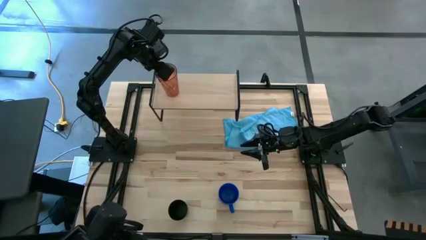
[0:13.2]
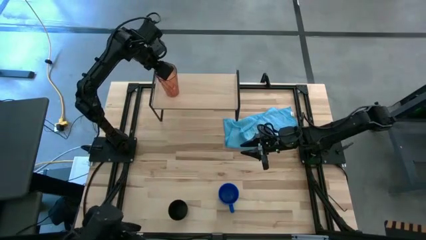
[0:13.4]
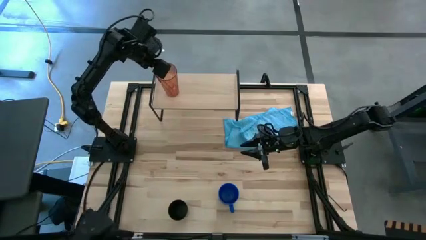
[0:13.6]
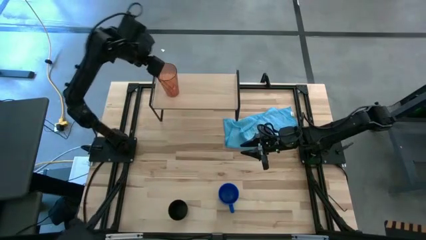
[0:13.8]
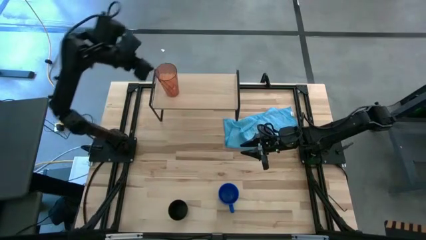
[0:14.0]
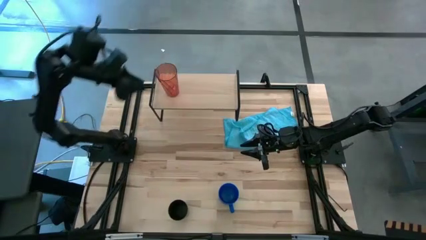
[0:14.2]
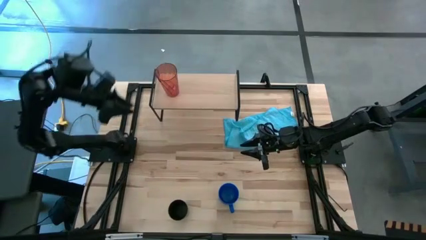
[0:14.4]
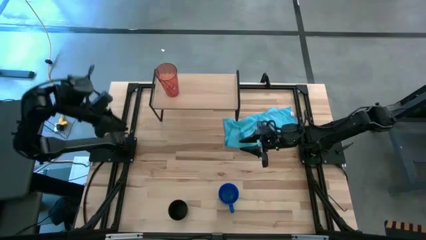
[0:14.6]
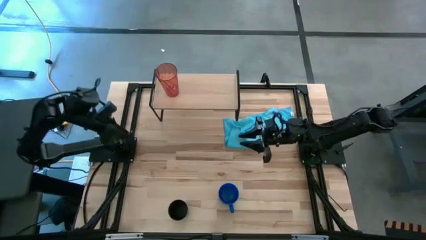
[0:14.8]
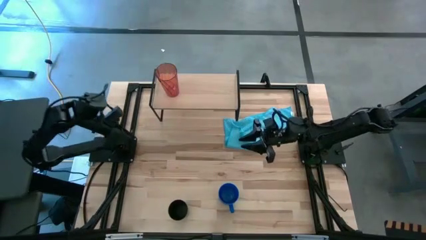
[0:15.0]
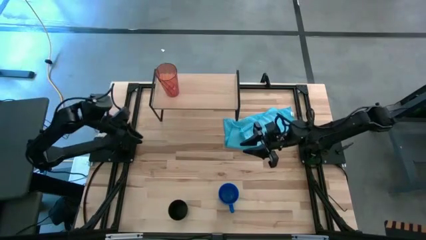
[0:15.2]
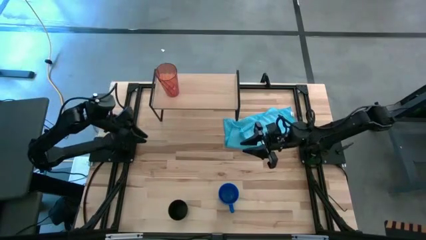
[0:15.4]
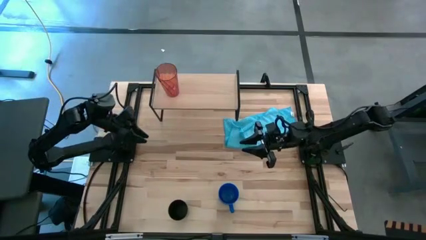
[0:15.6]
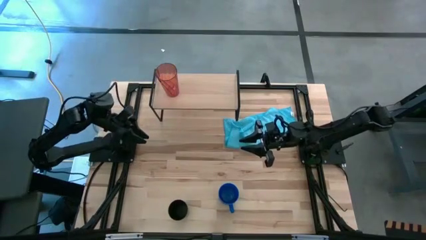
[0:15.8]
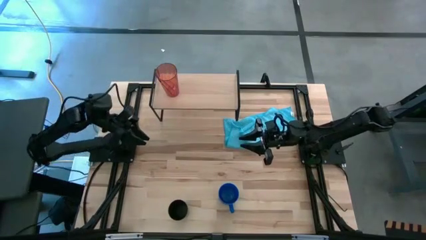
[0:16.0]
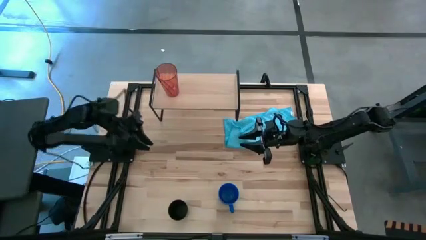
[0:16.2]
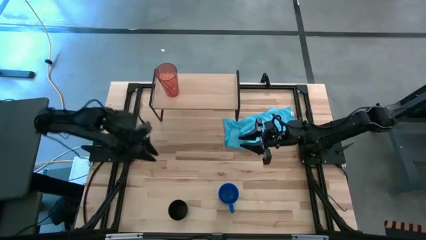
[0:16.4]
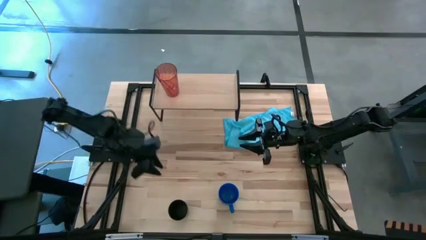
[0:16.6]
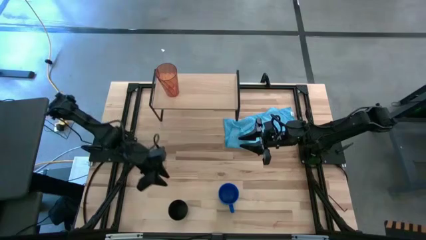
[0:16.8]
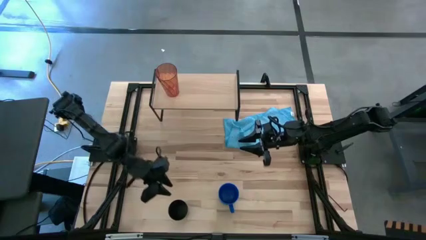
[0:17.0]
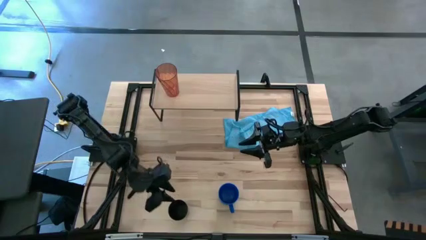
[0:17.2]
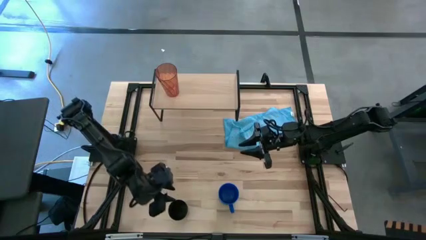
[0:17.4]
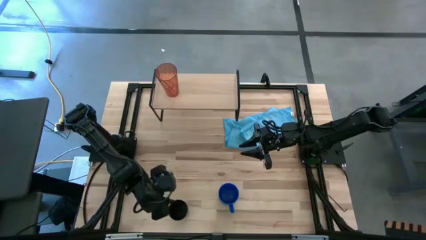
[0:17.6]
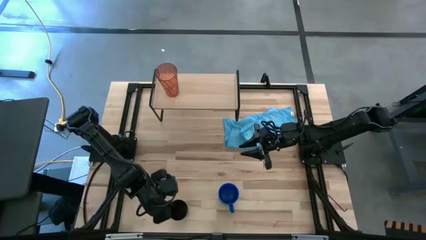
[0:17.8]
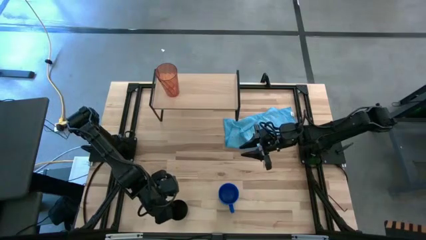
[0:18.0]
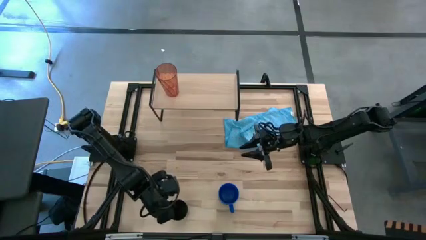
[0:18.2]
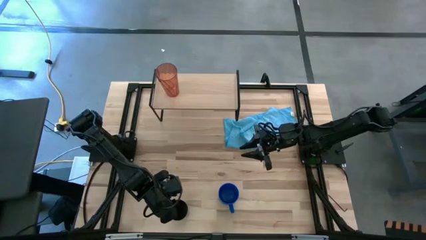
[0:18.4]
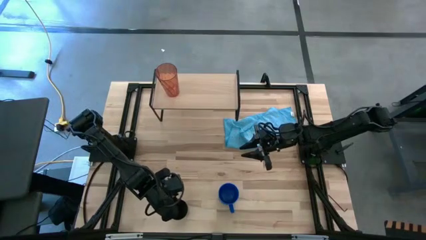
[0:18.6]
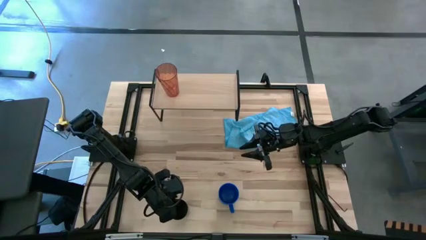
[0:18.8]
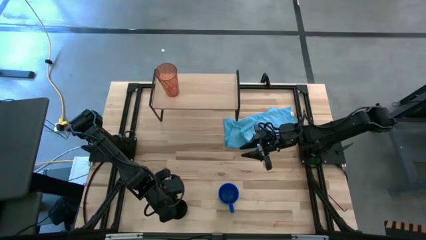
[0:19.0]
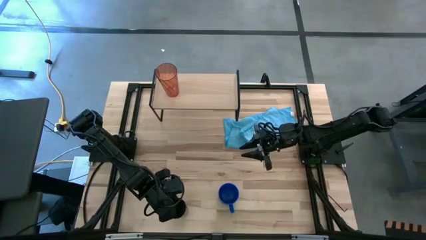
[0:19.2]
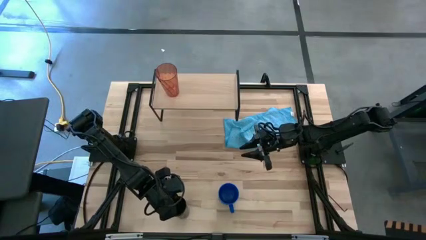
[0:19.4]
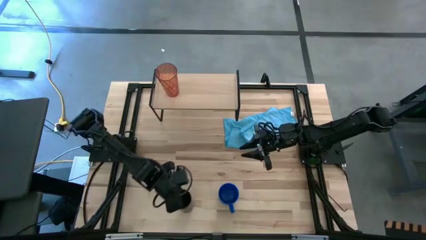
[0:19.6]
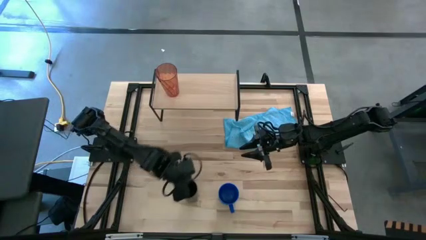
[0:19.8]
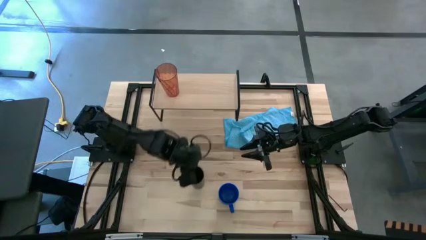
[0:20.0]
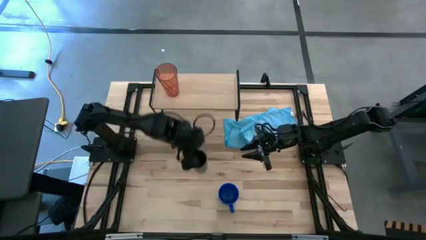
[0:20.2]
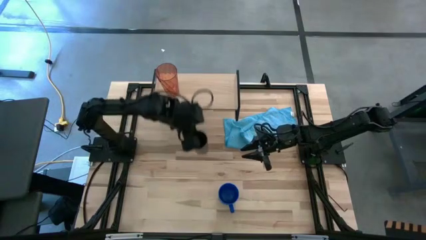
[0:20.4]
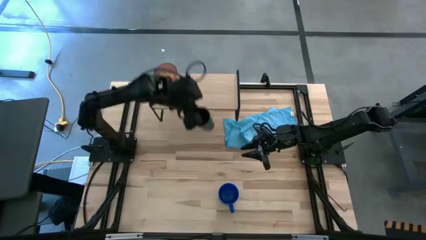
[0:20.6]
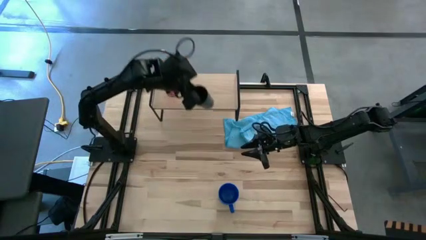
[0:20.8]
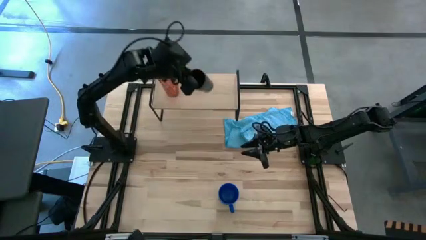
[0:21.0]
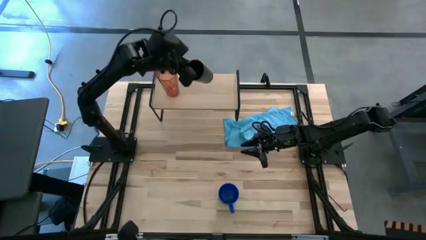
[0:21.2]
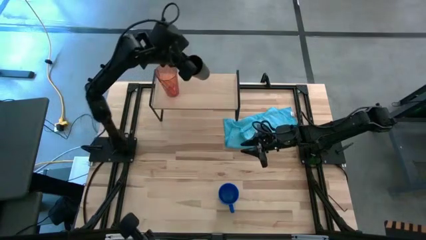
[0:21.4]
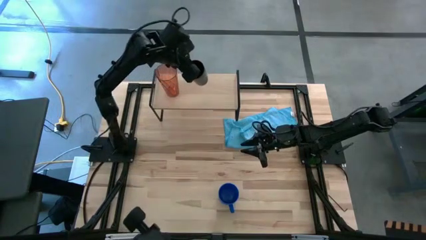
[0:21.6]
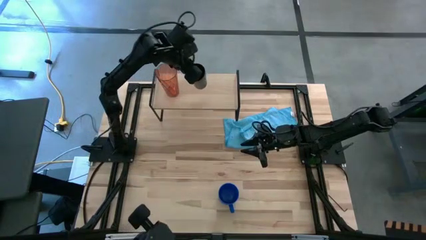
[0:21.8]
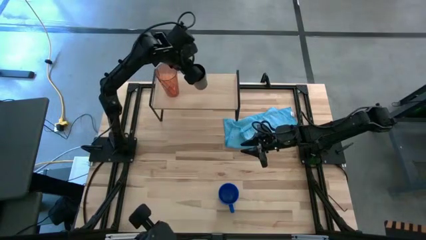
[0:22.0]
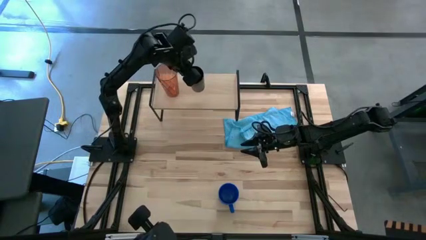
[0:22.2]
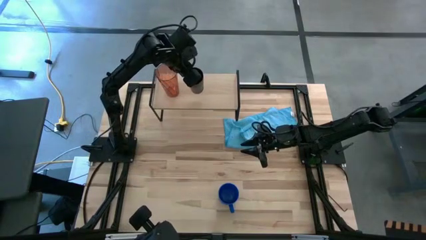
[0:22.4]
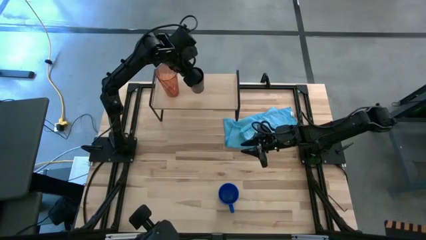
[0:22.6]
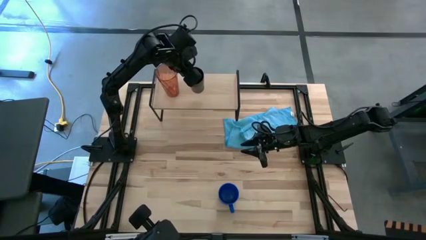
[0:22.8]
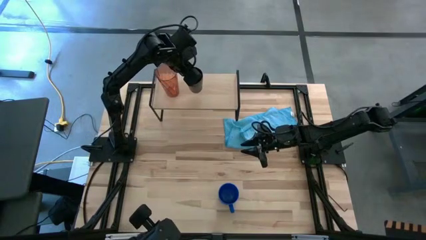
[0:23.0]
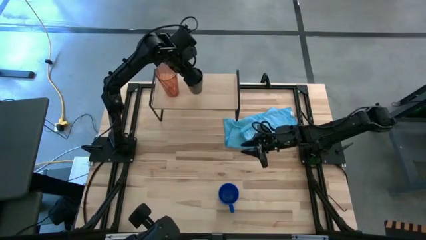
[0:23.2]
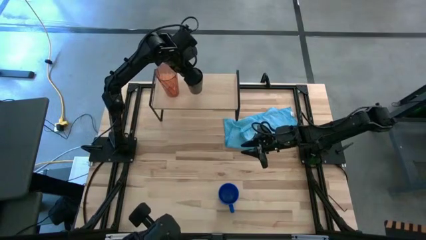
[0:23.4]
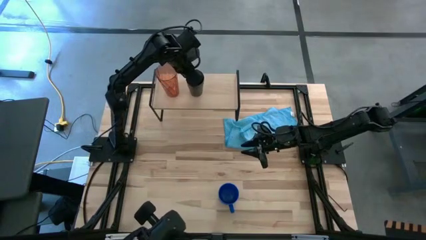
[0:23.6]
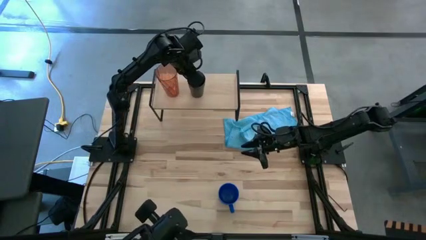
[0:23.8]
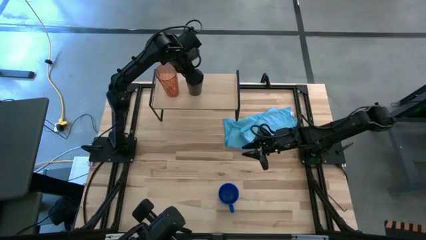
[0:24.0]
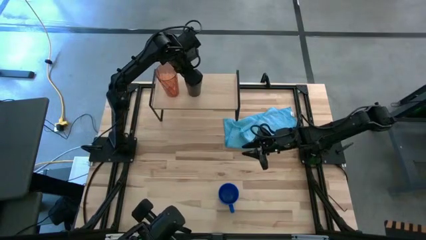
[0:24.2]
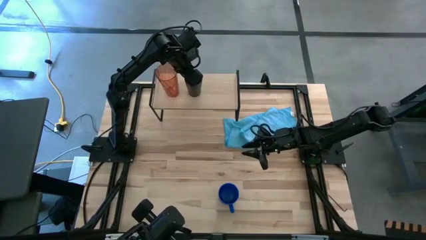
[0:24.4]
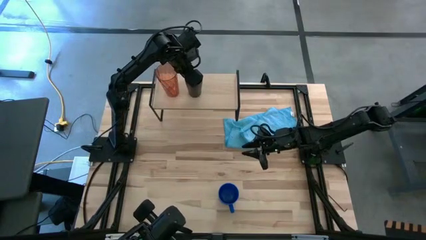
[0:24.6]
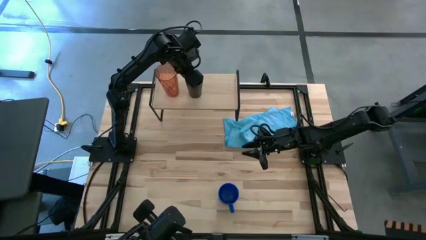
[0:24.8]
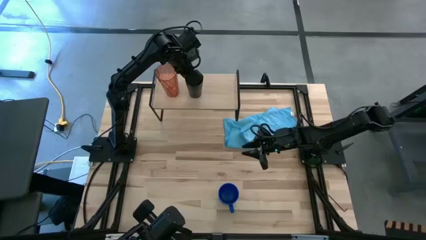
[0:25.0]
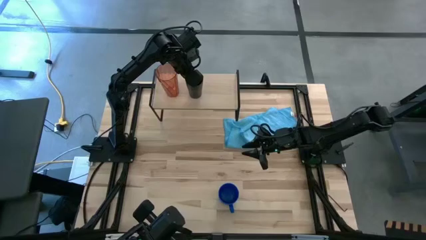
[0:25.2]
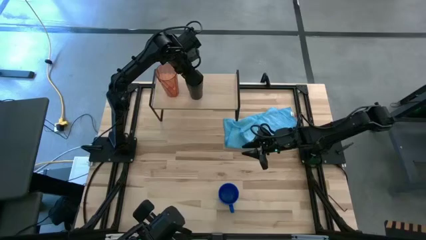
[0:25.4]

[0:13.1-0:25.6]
Task: Stack small to large cups/mugs on shelf
Put the black cup on the shelf

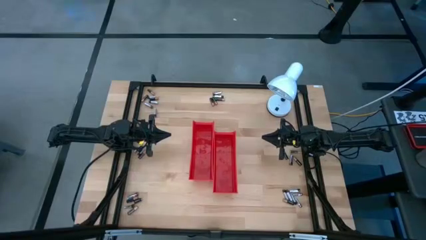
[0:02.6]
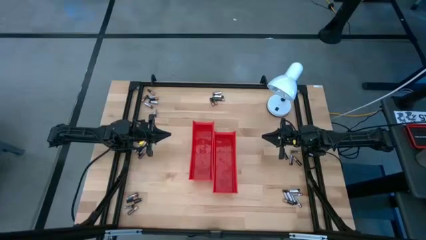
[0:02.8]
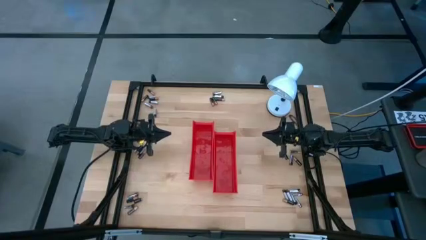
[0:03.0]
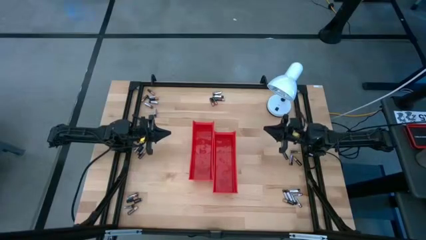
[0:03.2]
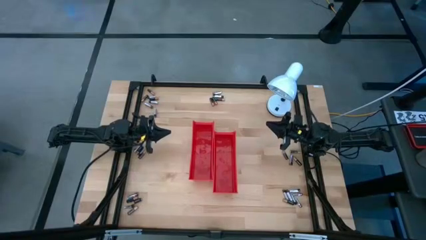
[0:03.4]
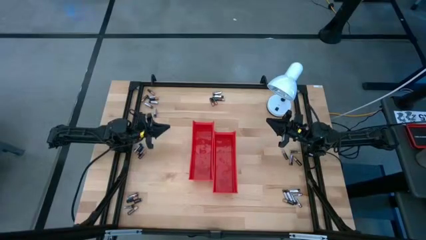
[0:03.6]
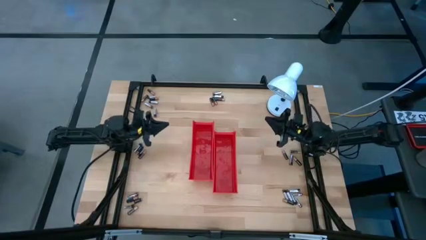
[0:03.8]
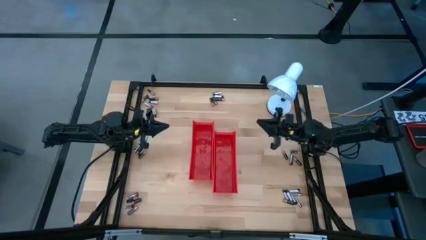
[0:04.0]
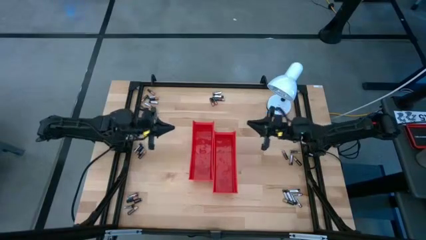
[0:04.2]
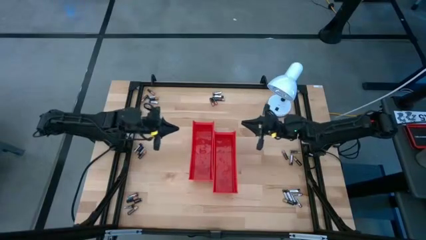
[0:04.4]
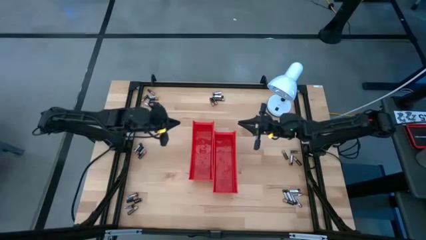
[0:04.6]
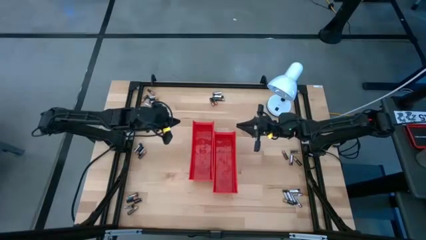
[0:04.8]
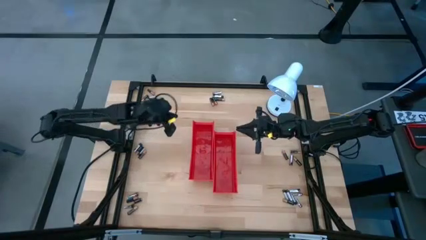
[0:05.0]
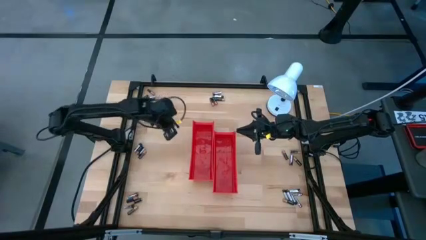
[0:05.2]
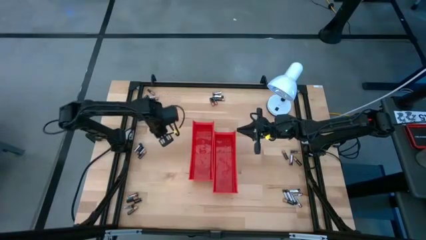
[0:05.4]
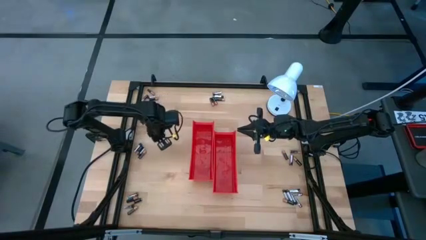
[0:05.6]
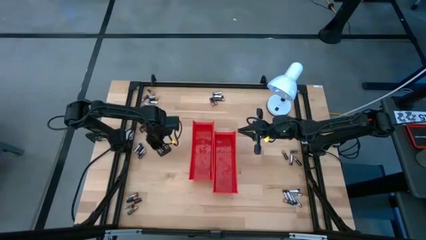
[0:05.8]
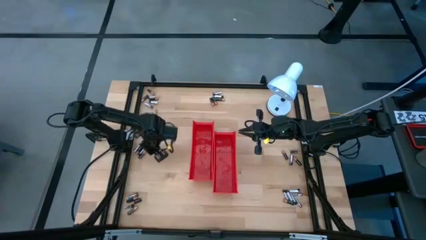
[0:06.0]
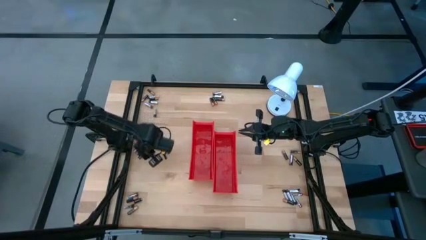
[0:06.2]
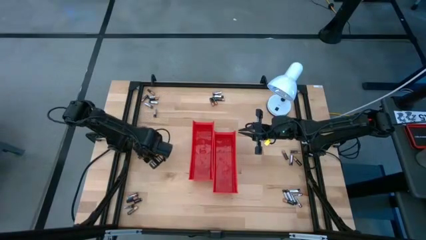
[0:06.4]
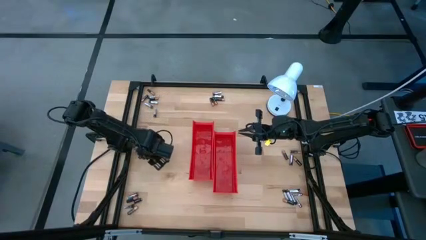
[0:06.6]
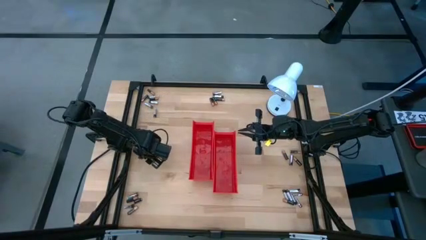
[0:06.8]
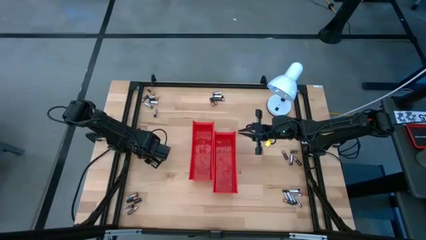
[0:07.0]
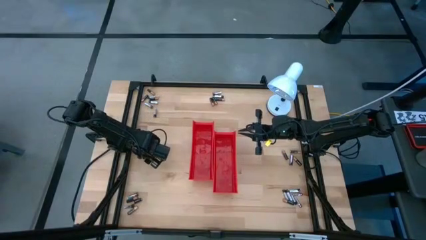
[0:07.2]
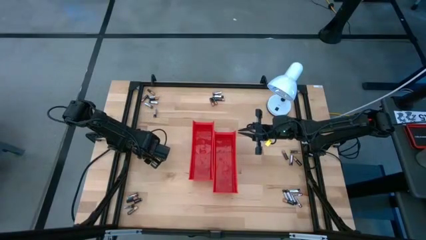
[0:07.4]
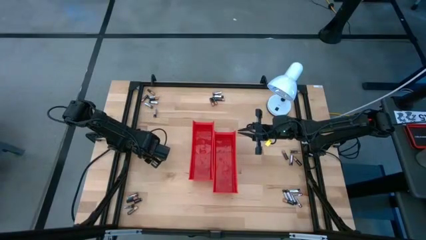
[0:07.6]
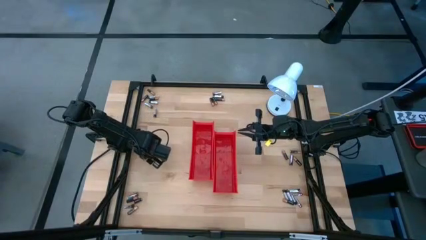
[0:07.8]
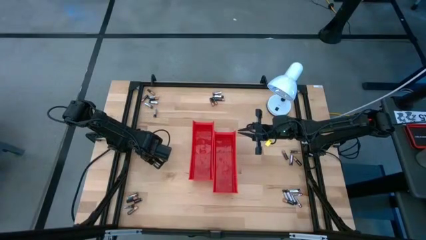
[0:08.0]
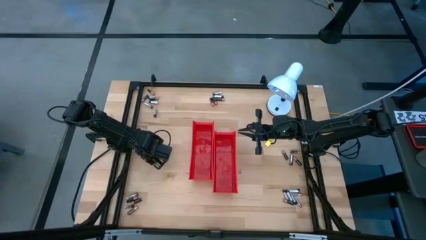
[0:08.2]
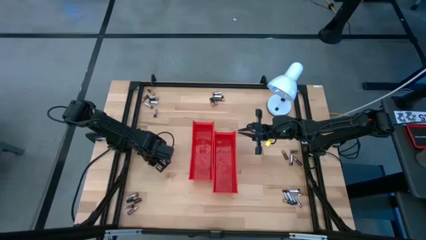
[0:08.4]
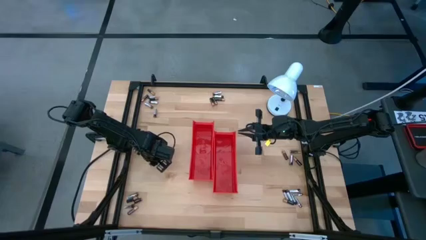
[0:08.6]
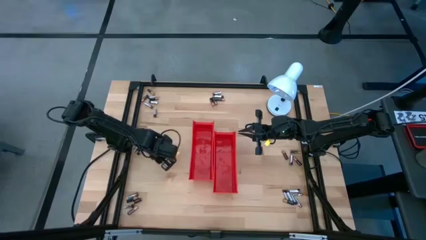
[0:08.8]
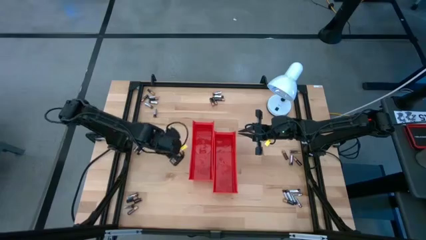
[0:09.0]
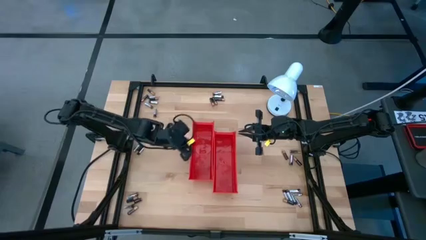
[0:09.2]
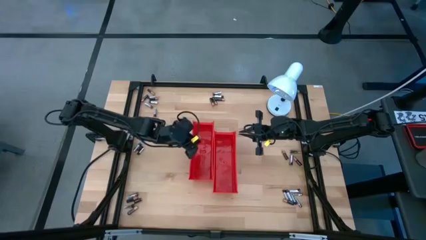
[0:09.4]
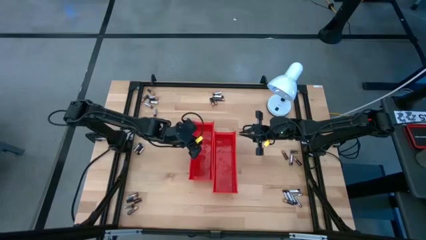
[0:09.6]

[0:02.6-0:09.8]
Task: Sort batteries
Put the black battery into the left red bin
